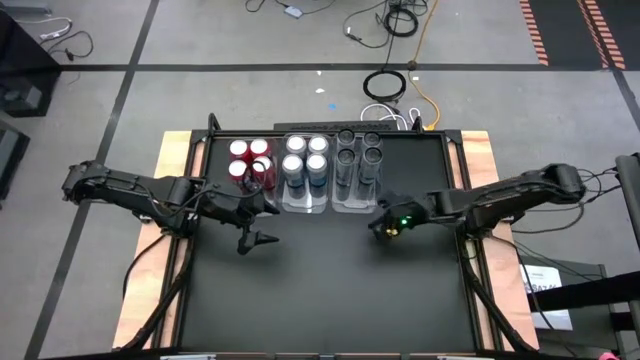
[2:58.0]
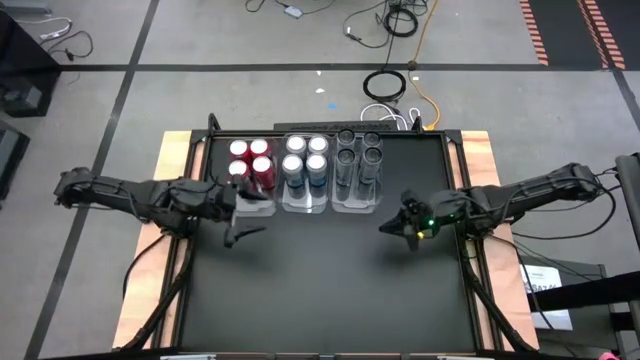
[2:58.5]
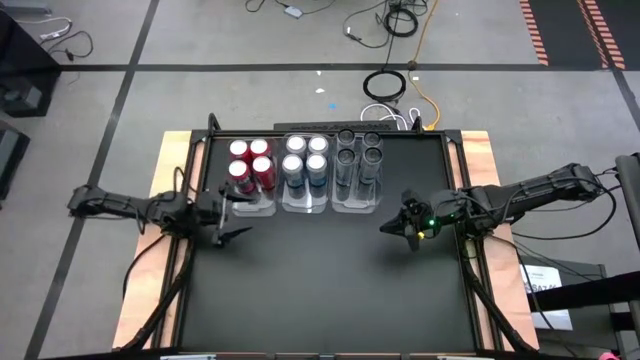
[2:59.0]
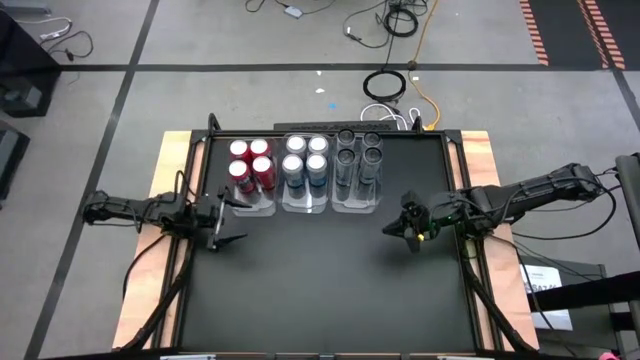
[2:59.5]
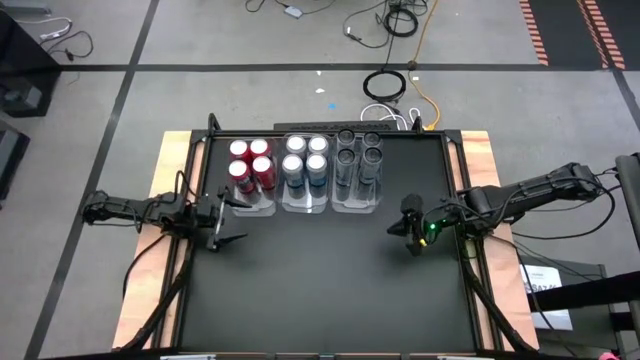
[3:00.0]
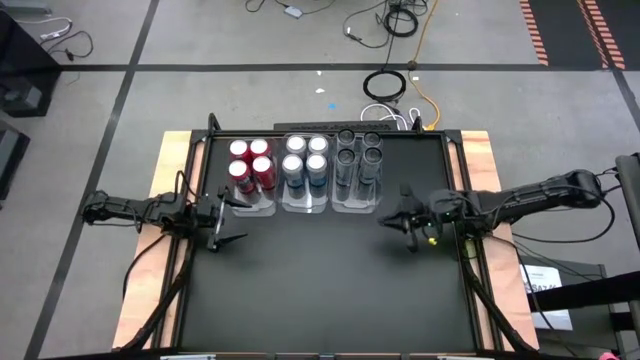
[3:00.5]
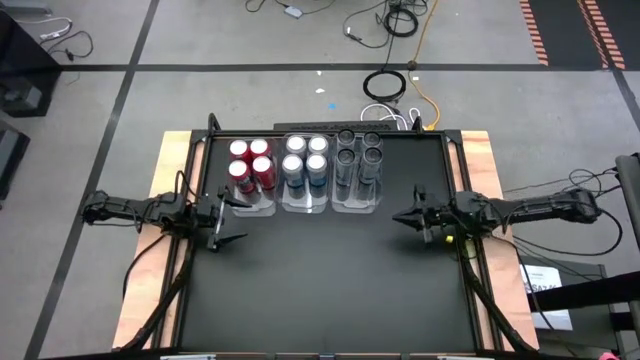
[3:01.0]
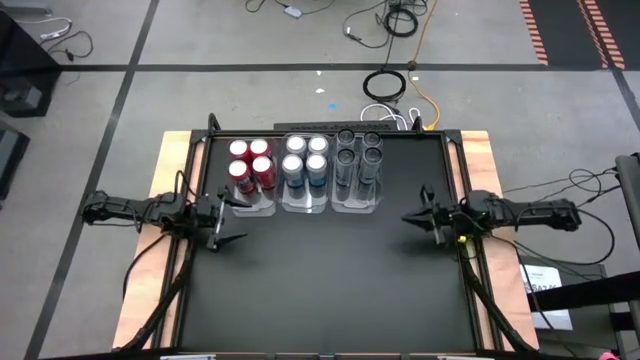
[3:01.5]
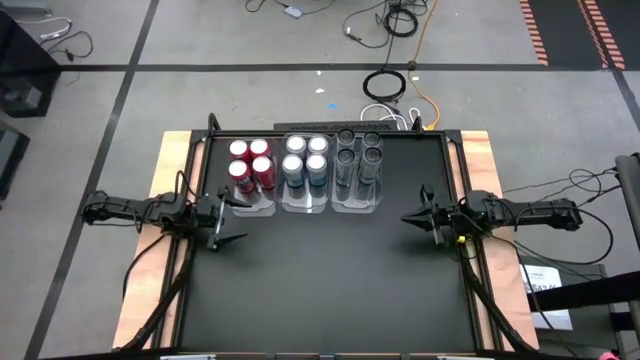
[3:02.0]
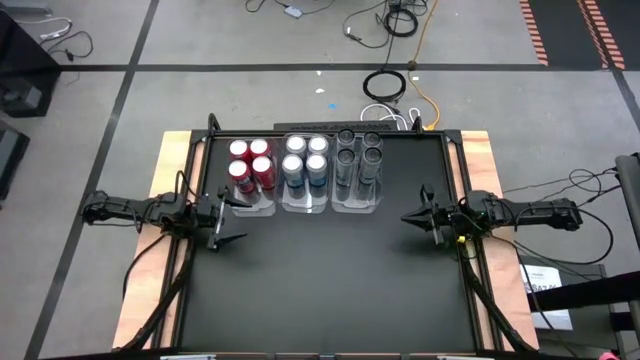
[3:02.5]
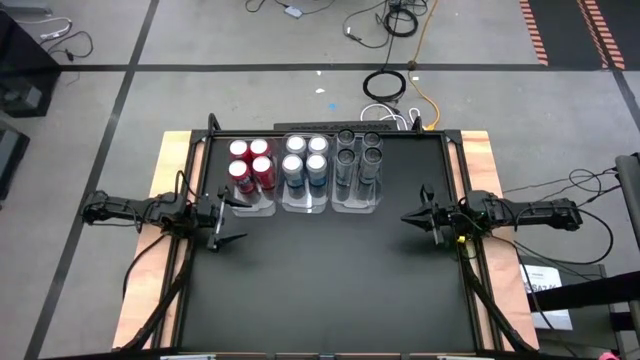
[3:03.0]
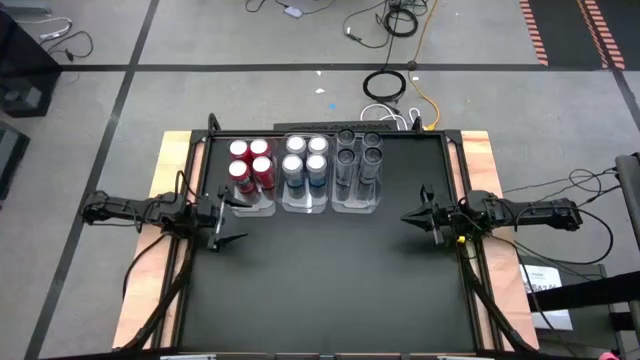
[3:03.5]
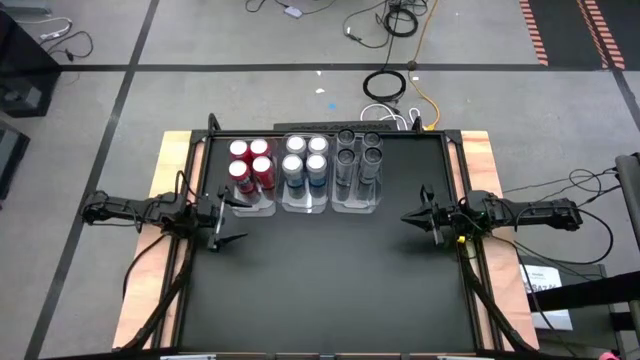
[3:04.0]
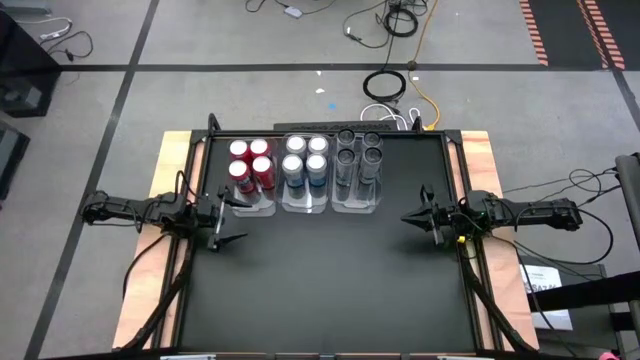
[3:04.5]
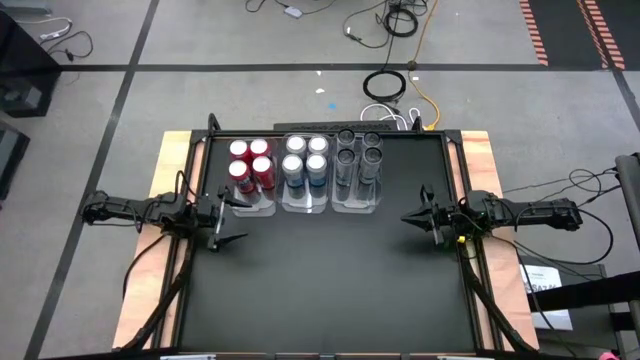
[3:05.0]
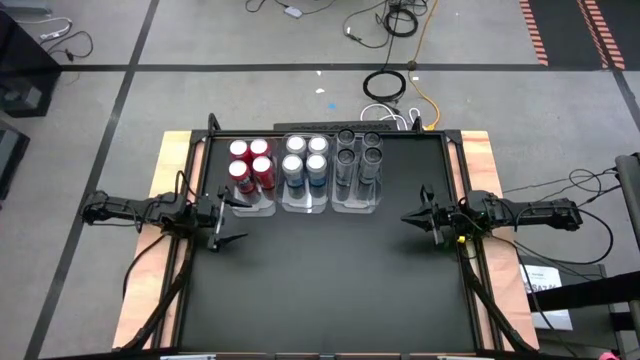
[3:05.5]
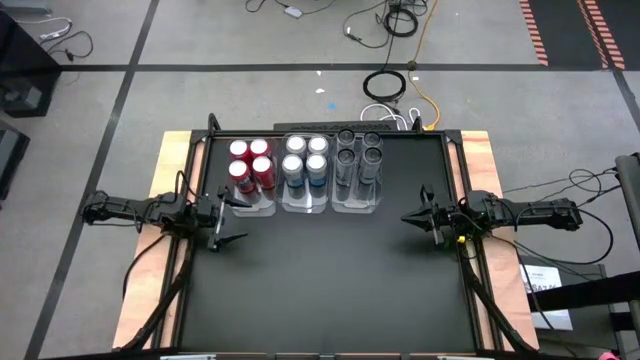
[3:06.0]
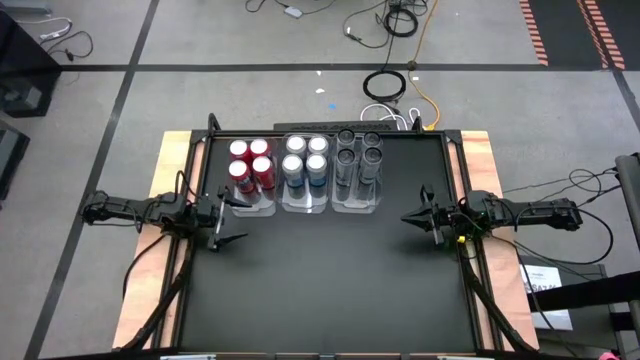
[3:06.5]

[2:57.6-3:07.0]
Task: Sort soda cans
Return to Home Position

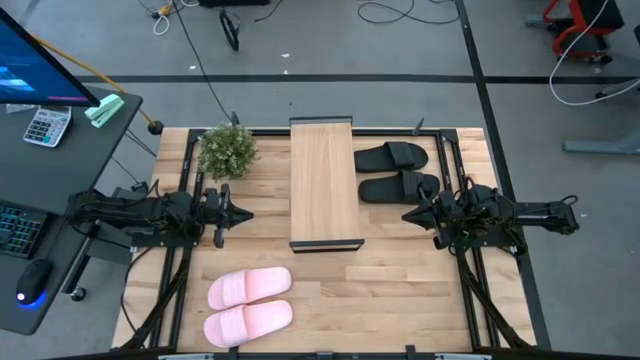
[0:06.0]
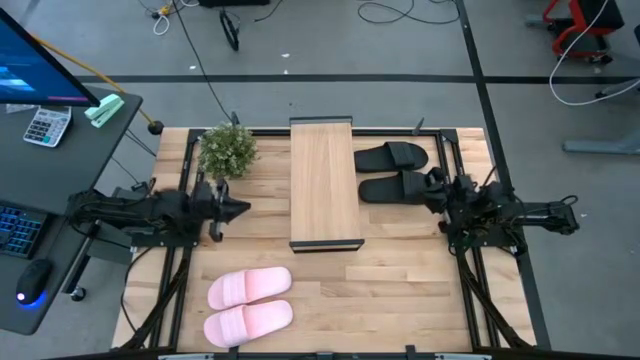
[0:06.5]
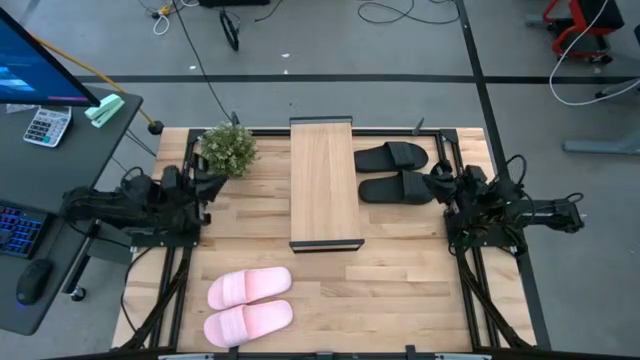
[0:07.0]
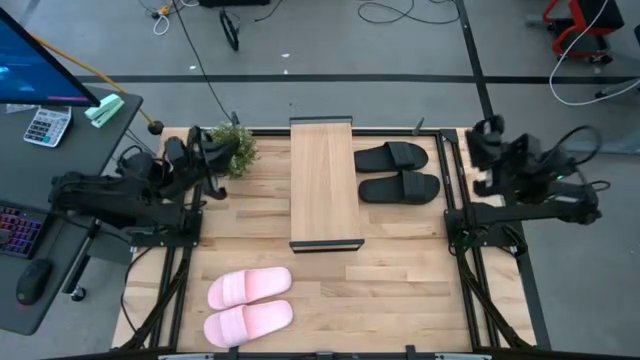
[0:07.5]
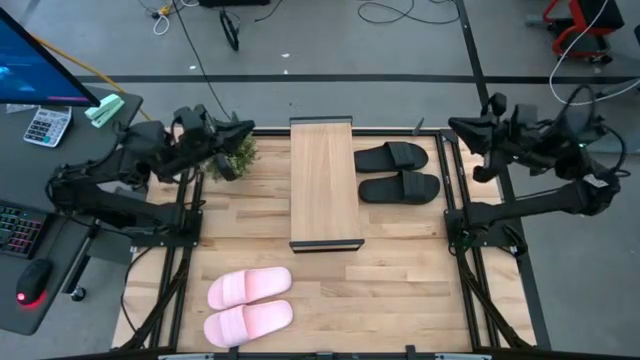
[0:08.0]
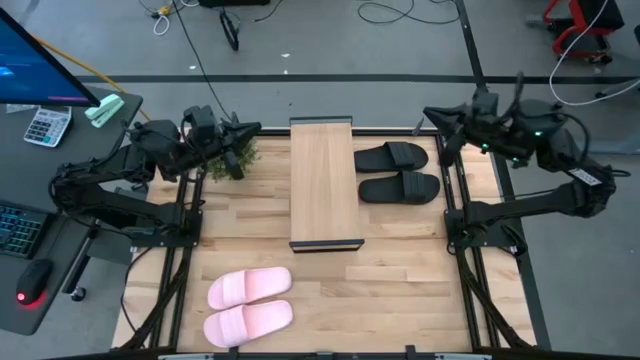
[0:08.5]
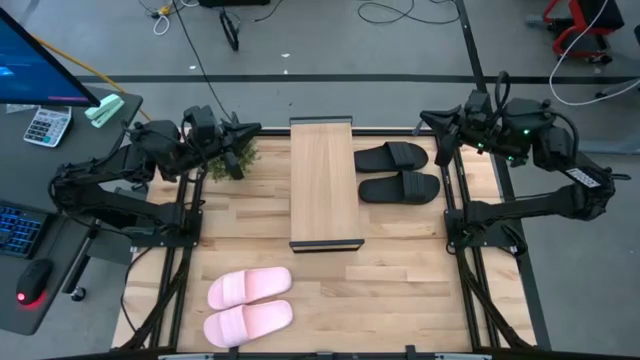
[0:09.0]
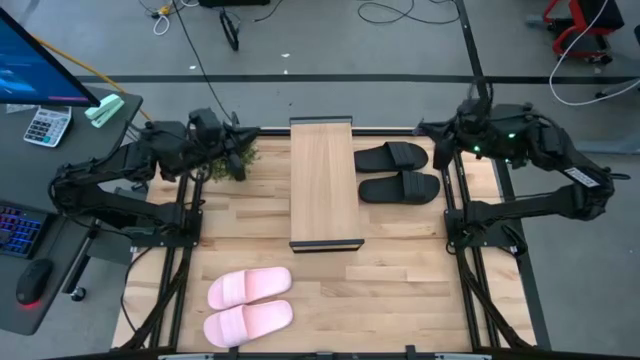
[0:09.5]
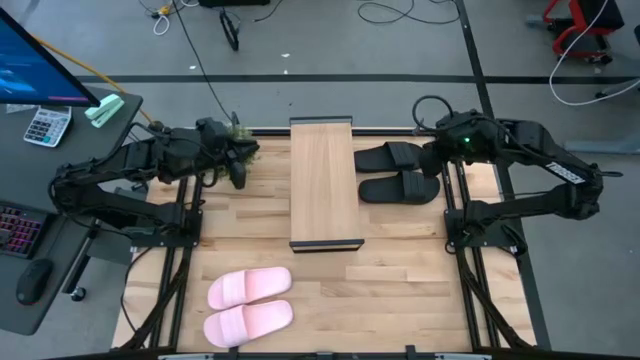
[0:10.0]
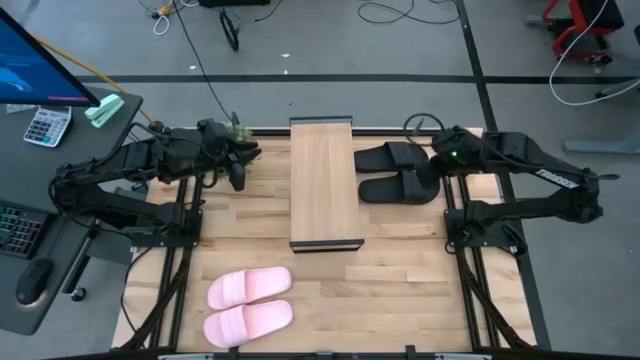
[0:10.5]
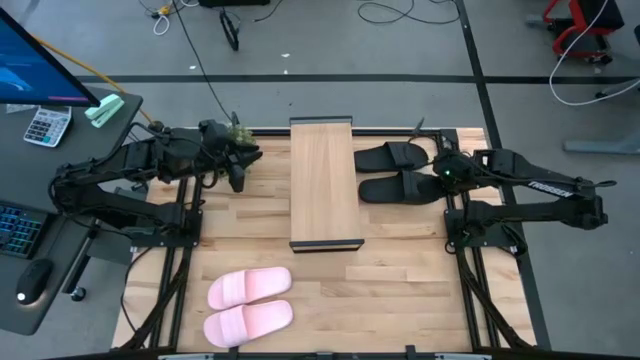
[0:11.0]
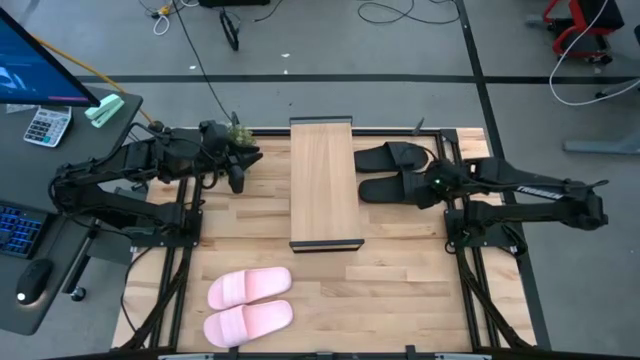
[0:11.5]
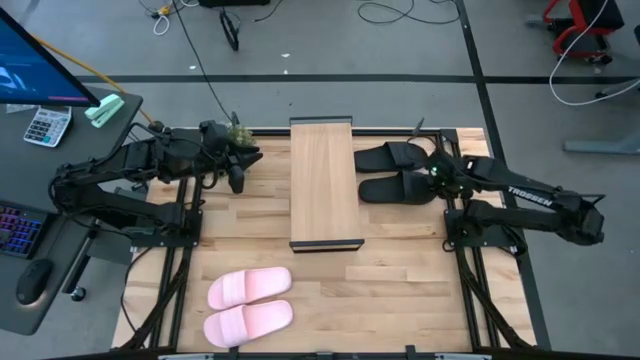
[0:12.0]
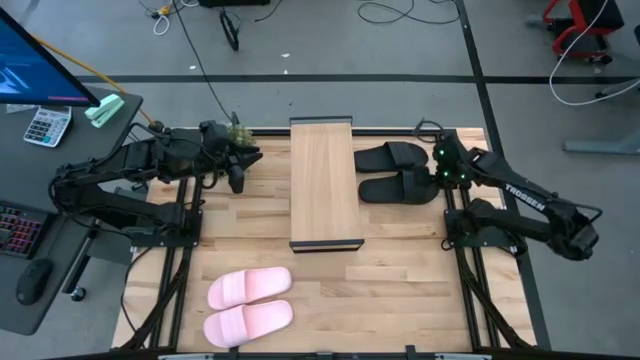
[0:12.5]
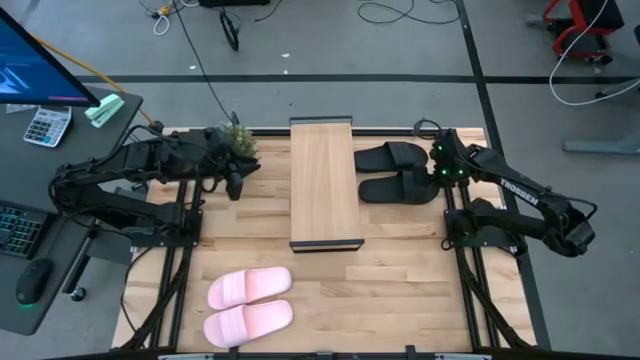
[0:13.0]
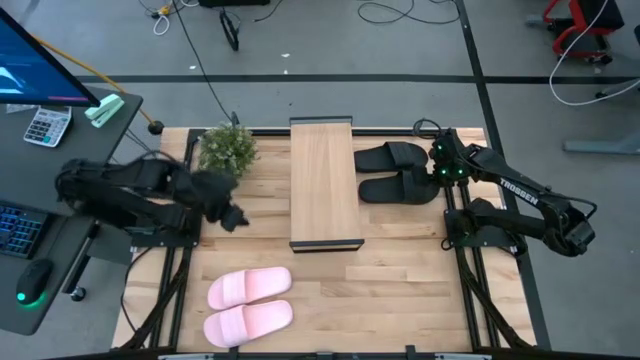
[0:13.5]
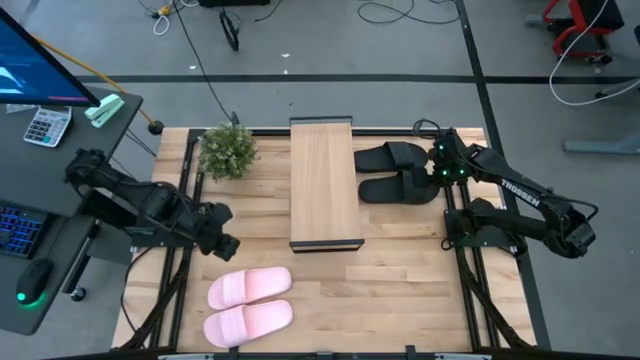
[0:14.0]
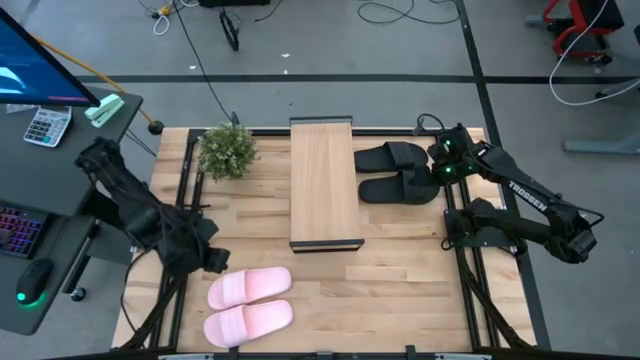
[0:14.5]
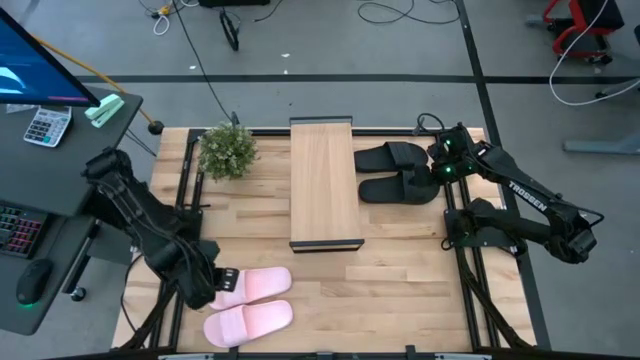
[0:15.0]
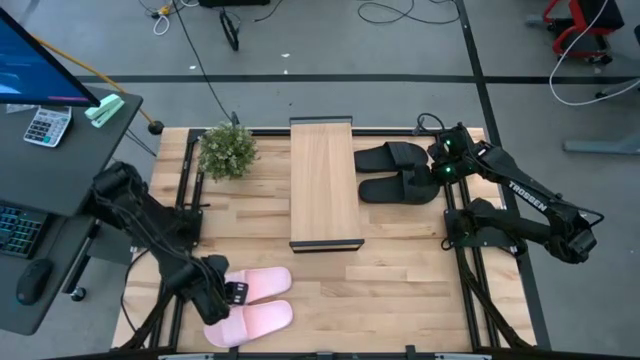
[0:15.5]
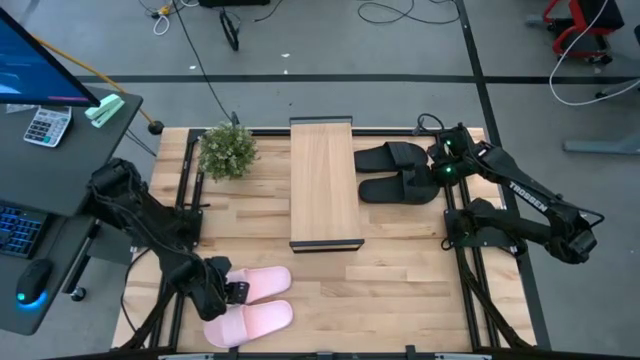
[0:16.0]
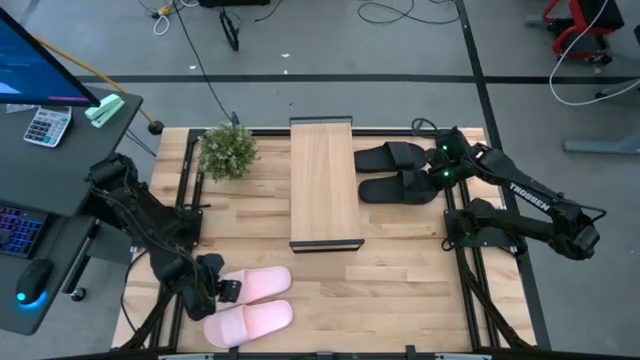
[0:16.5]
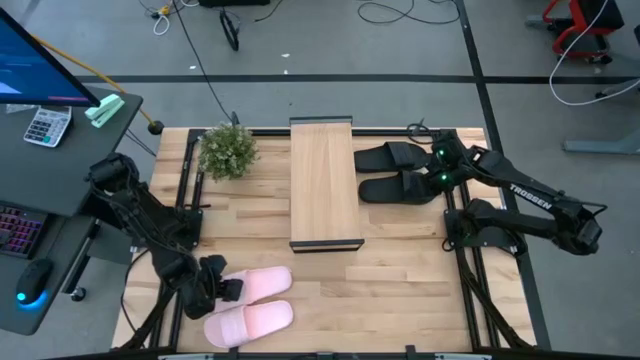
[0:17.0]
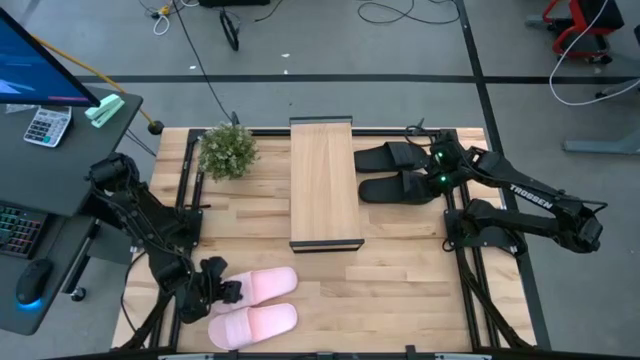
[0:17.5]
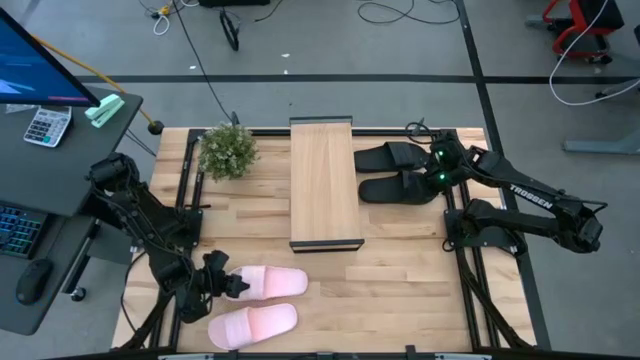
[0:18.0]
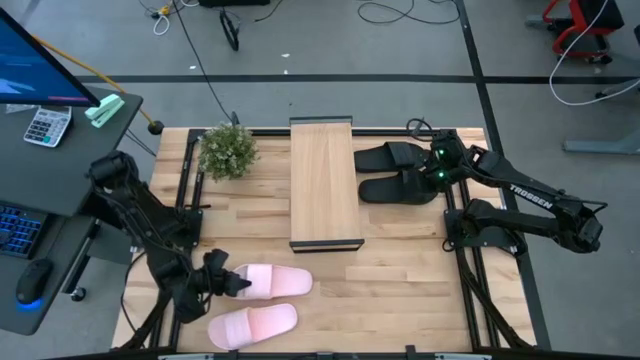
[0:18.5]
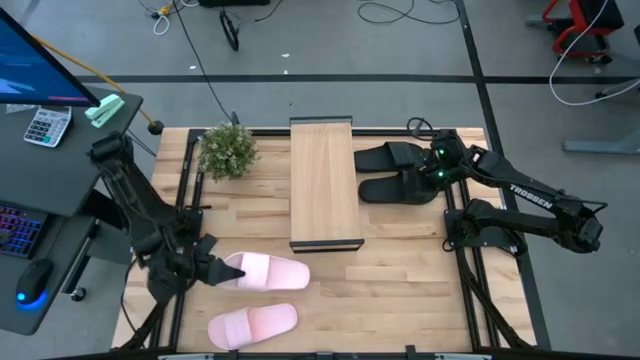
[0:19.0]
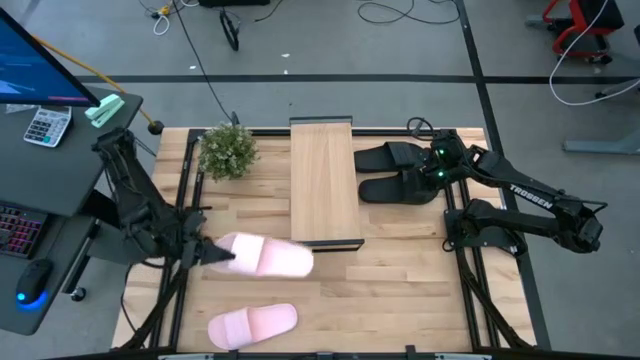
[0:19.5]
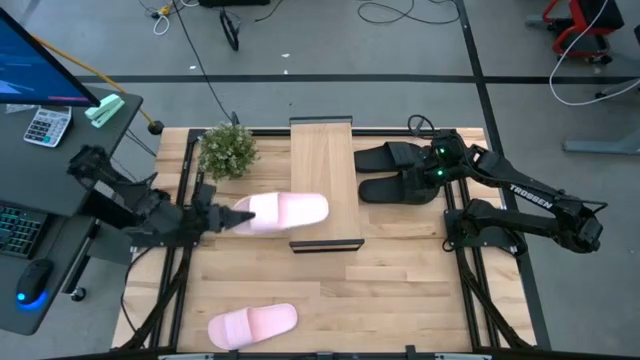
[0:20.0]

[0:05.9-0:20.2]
Task: Pick and place slides into the shelf
Put the top pink slipper on the shelf
